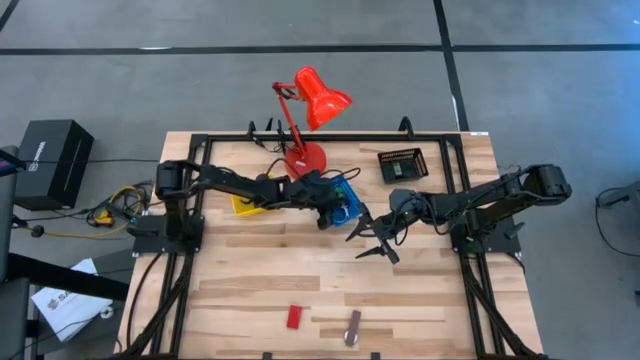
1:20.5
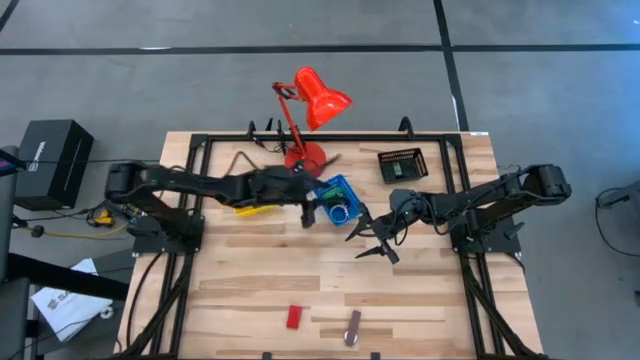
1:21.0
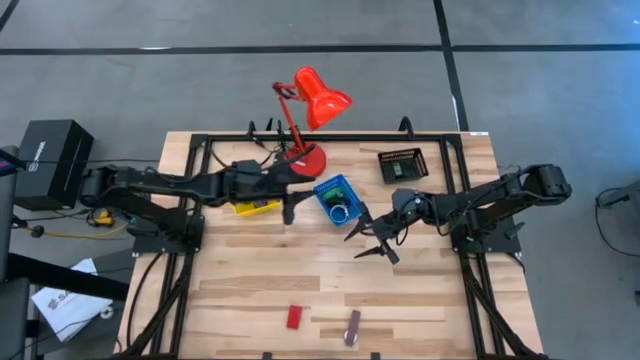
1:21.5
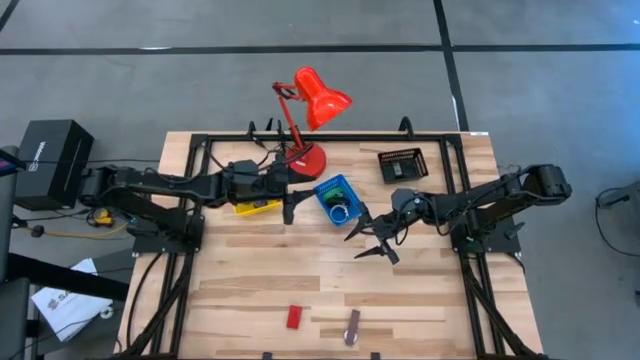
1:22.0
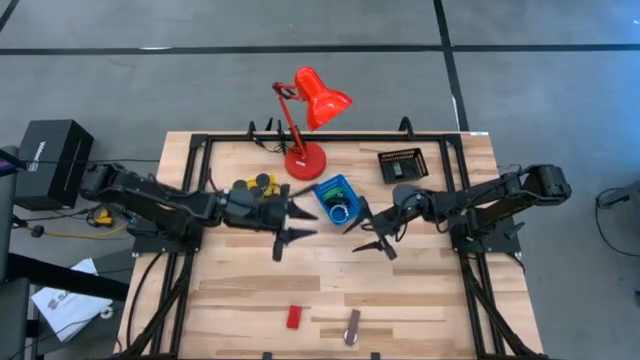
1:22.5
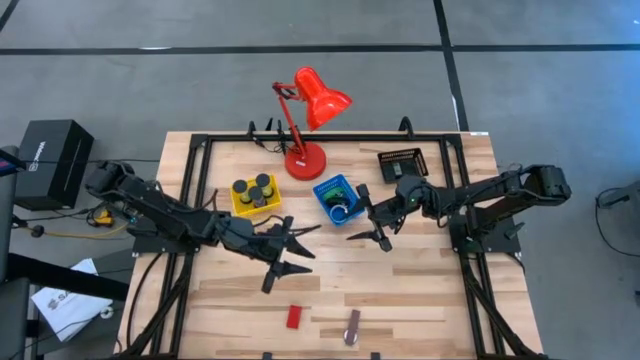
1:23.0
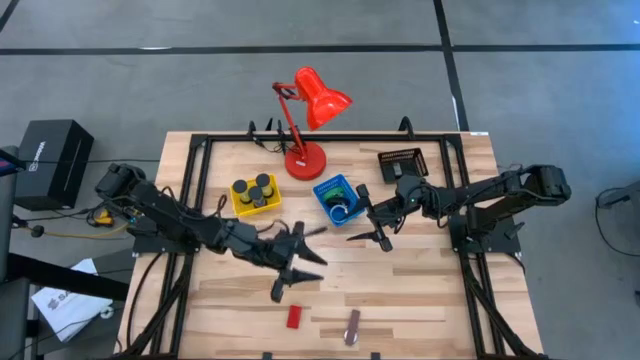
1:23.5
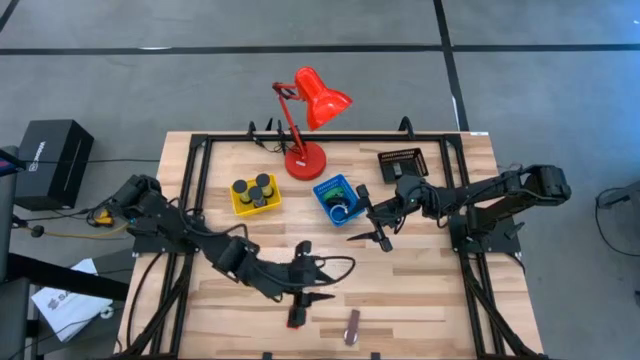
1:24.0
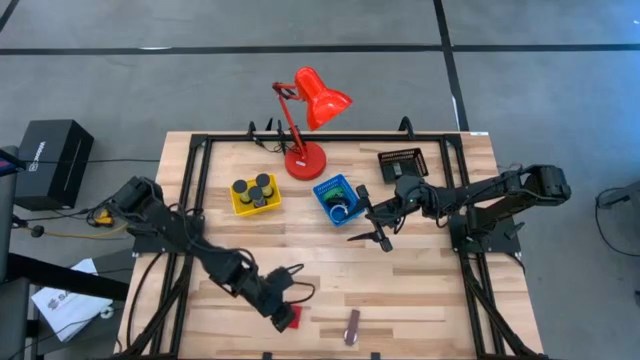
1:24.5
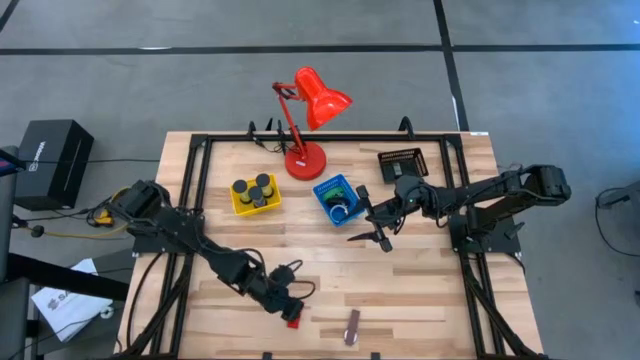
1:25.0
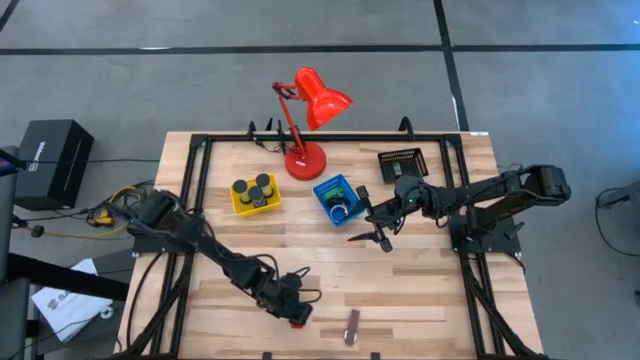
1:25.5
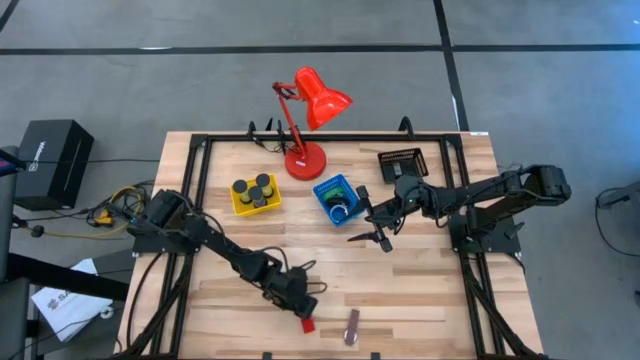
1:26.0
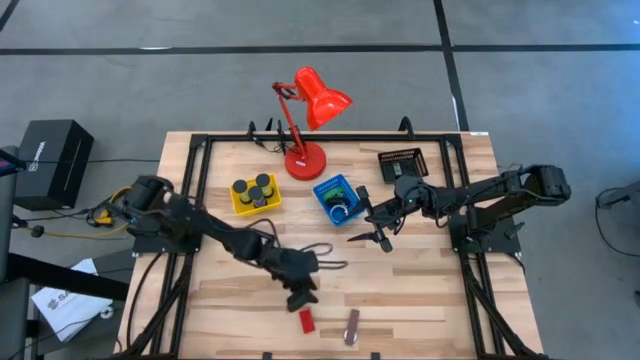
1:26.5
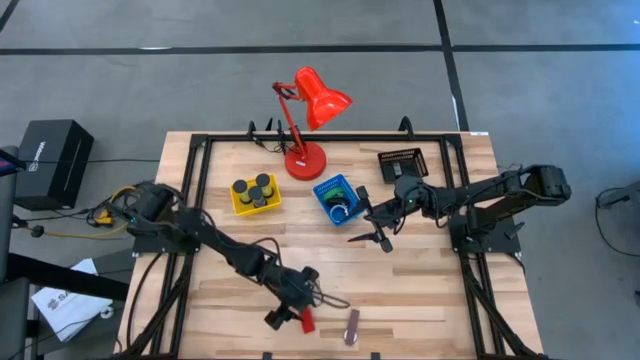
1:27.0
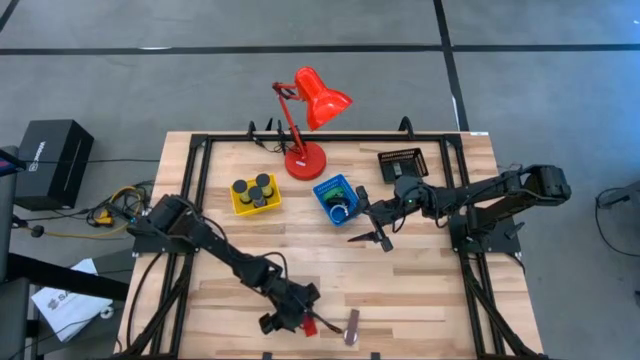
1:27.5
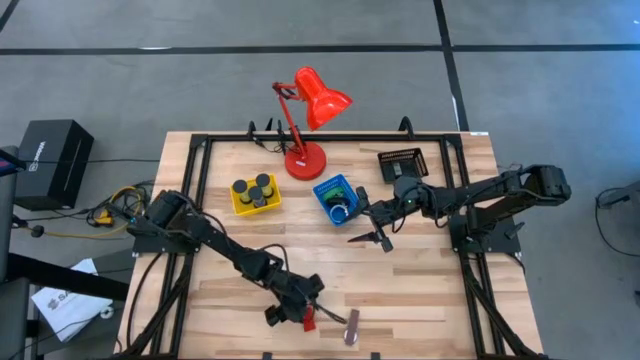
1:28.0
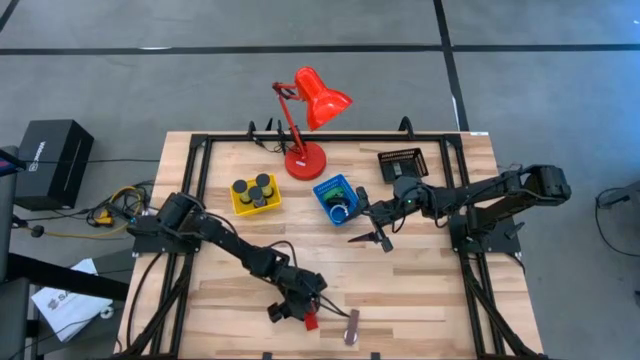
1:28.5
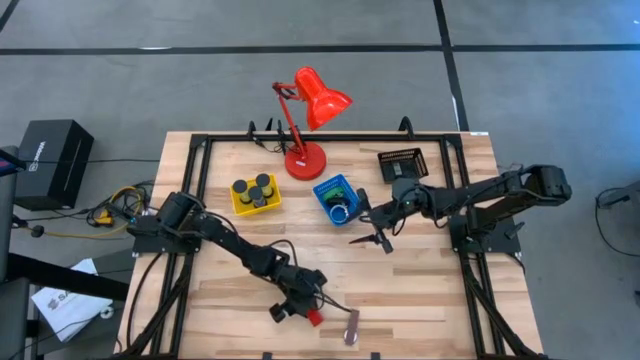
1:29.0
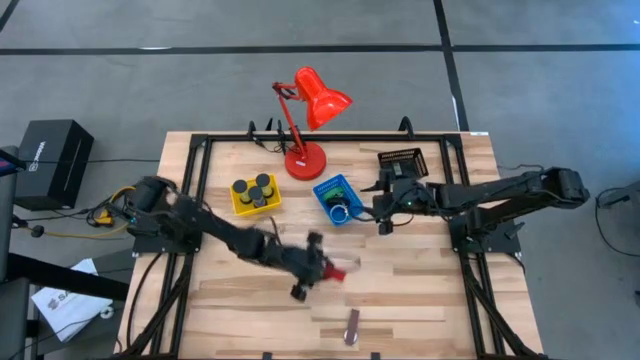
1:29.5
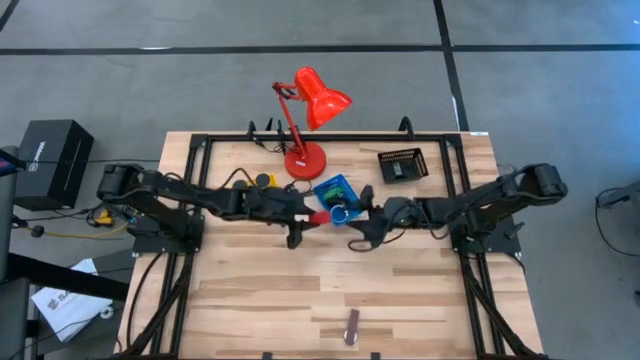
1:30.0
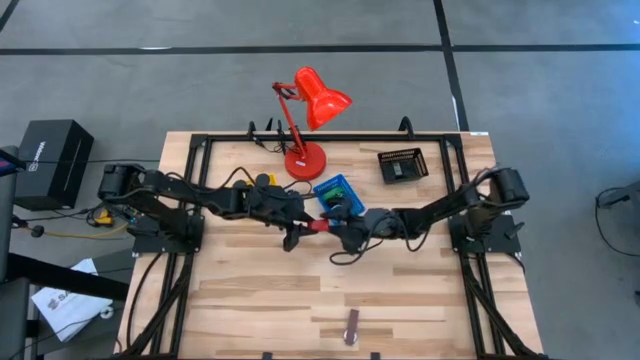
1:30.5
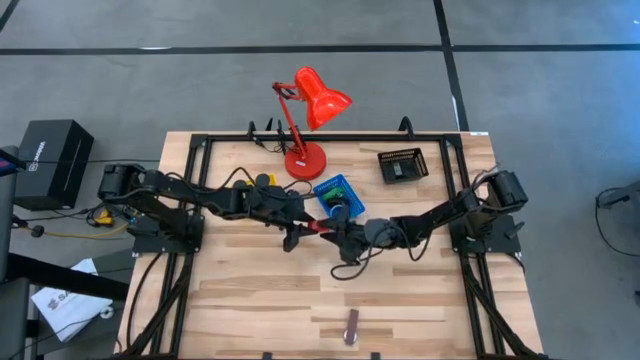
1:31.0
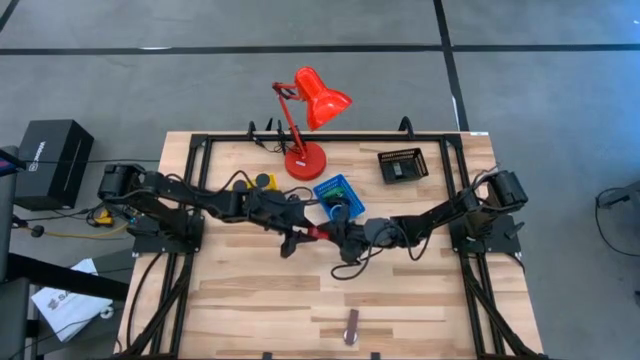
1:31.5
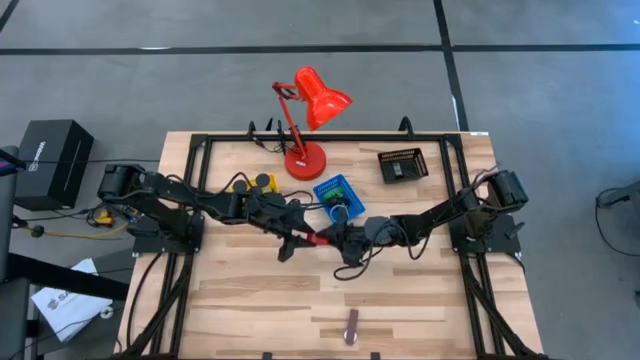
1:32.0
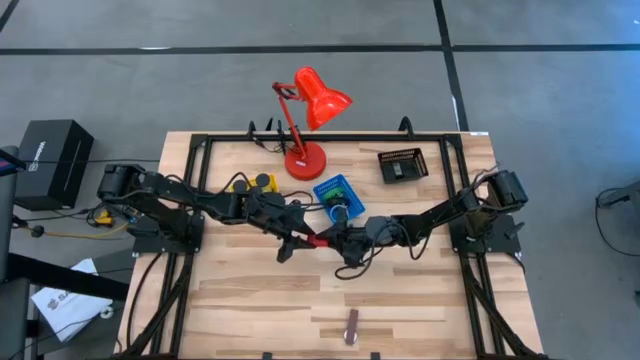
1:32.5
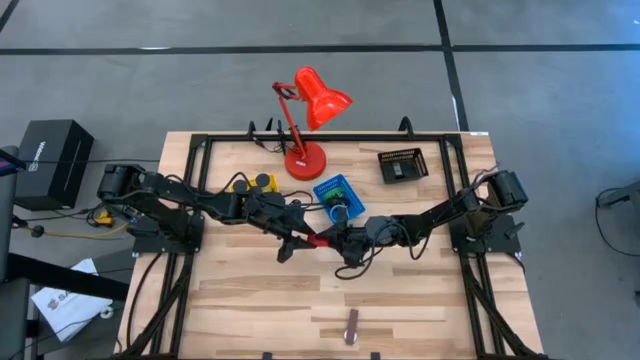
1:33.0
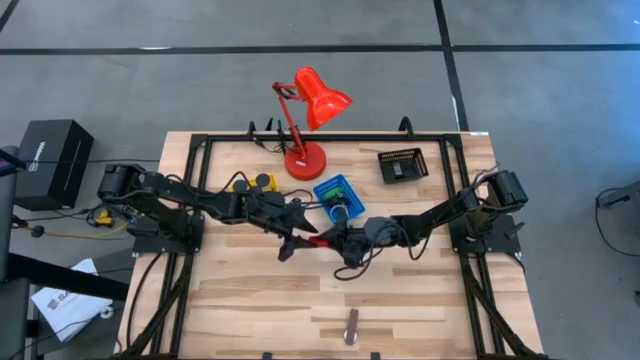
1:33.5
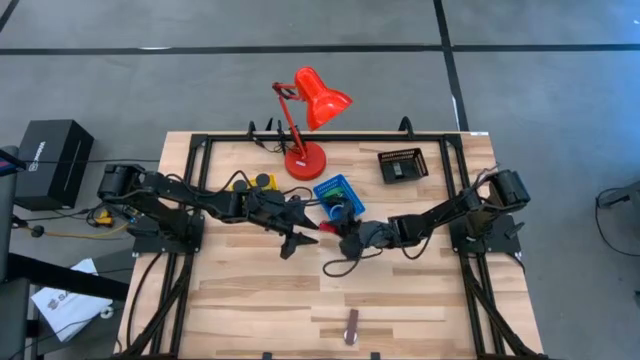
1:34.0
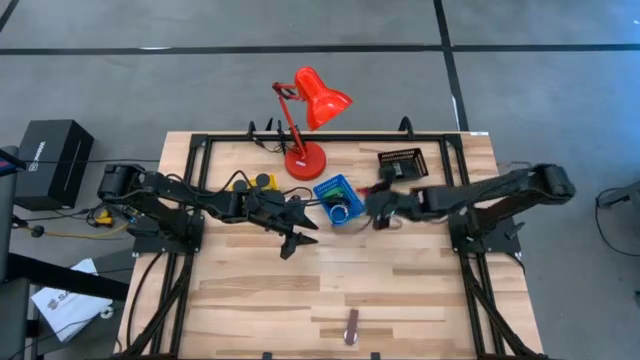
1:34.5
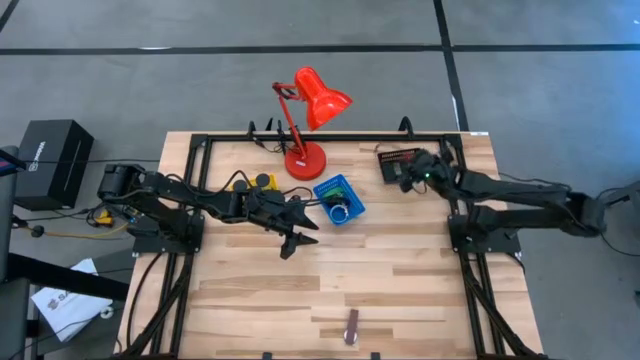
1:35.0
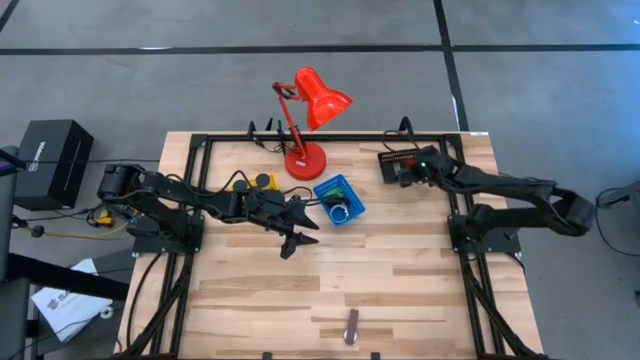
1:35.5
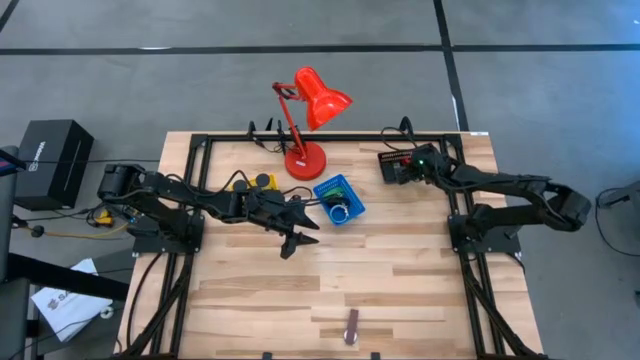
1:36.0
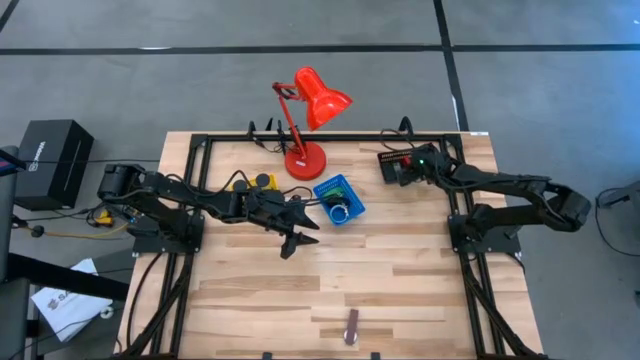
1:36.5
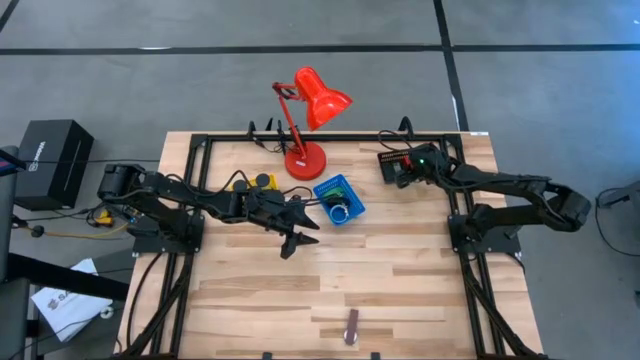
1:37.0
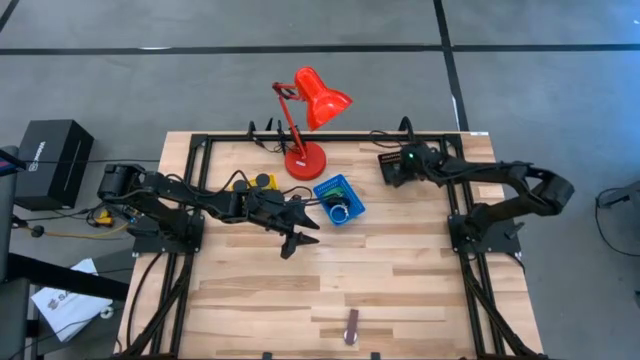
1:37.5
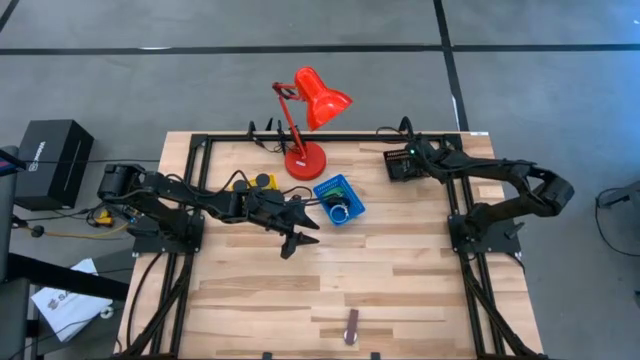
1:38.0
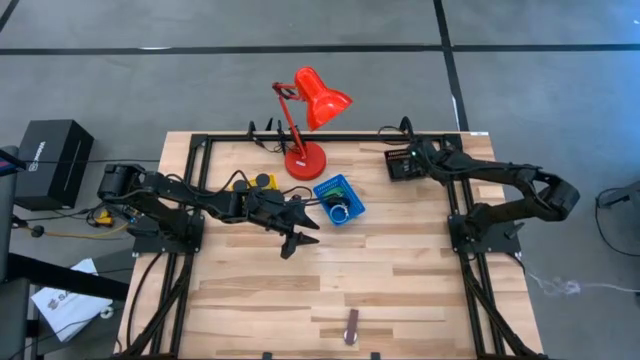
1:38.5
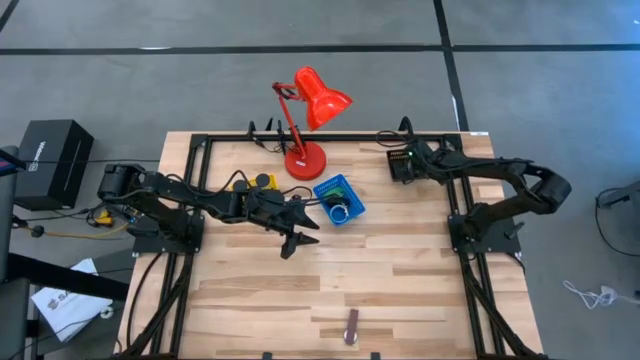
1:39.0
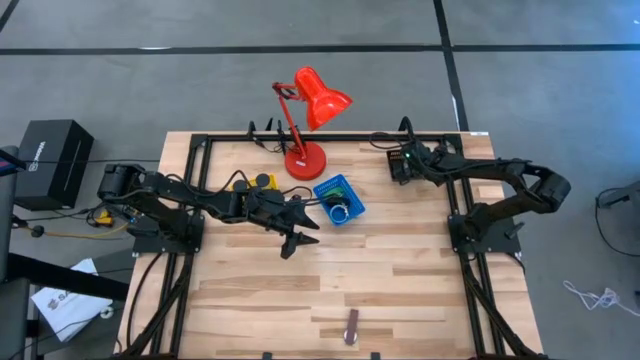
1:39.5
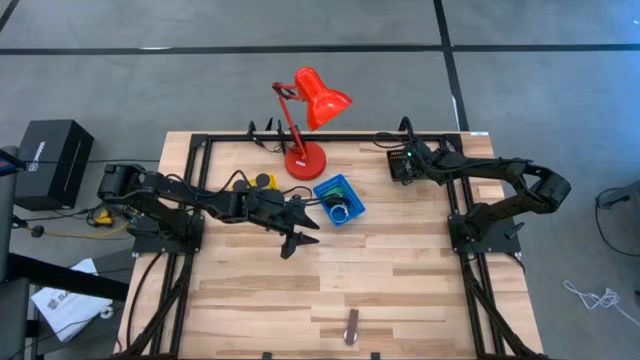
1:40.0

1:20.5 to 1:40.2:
Task: Pick & Place Office items
Put the red digital clock into the black bin

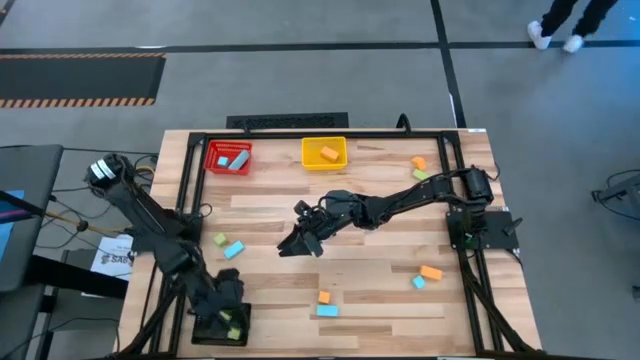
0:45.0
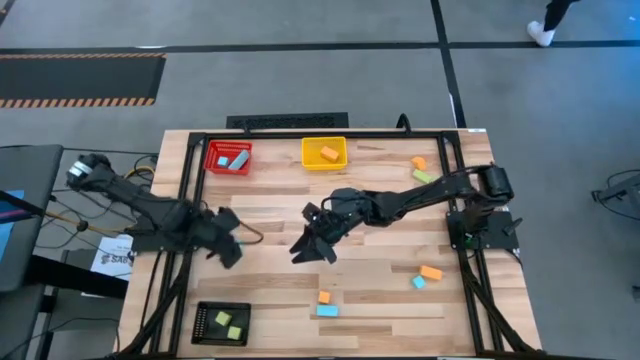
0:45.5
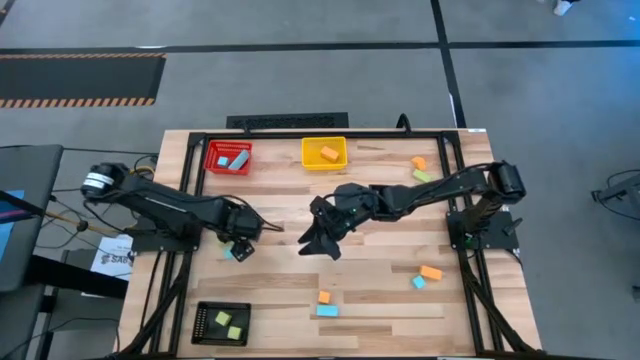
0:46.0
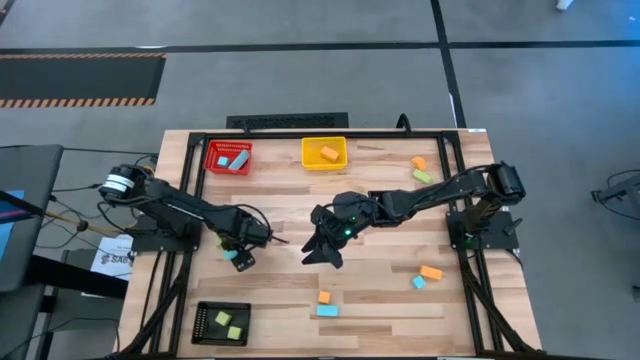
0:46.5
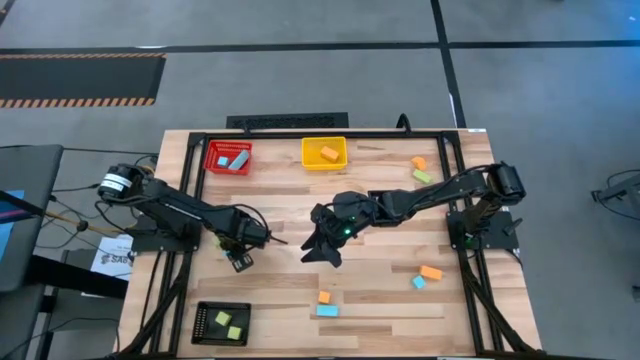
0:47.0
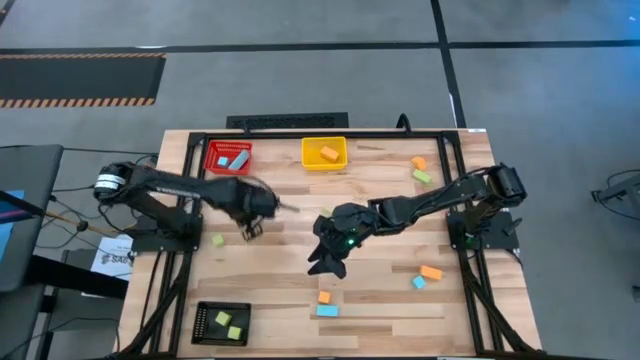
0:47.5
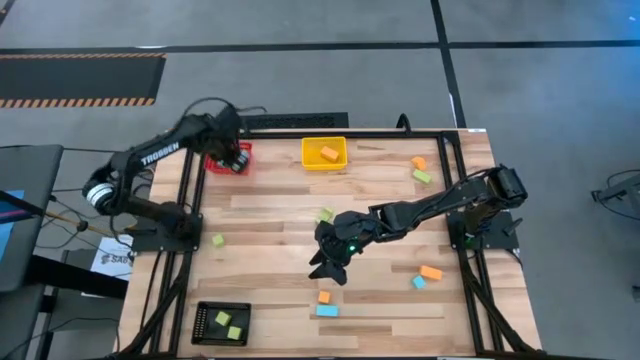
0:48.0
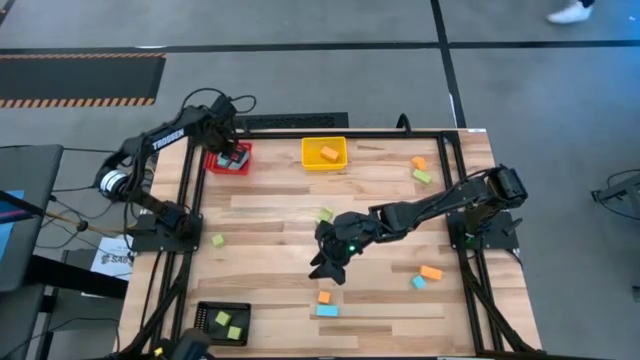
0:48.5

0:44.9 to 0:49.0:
Task: Sort & place blocks by color
Put the wooden blue block into the red bin
